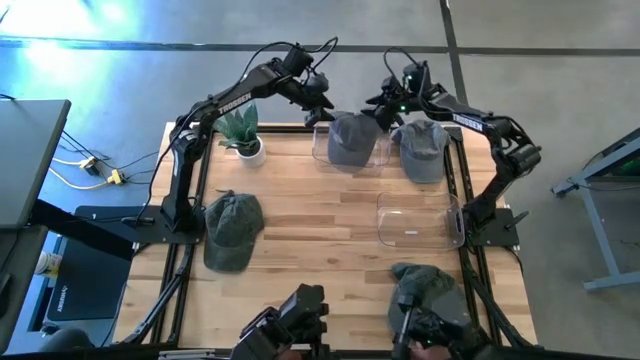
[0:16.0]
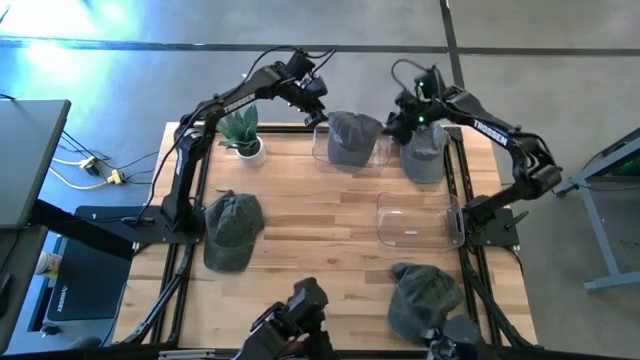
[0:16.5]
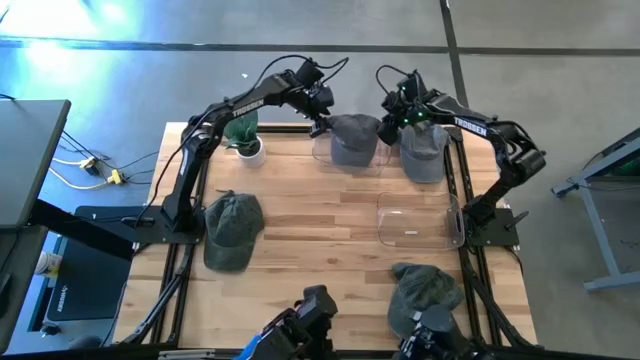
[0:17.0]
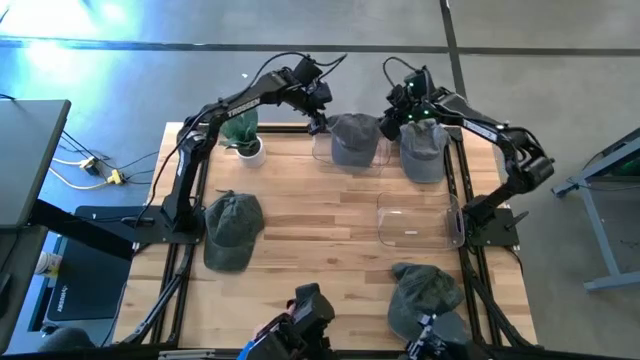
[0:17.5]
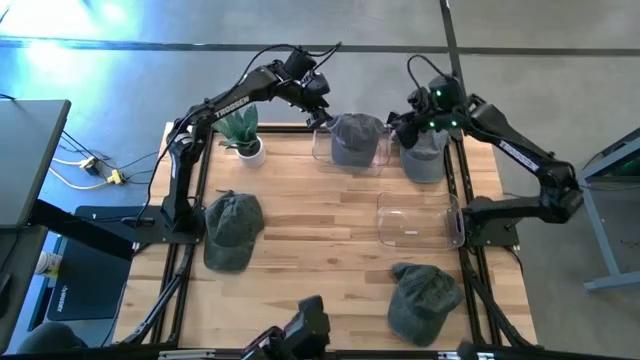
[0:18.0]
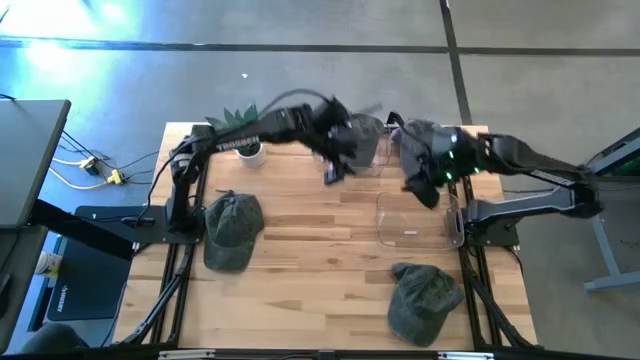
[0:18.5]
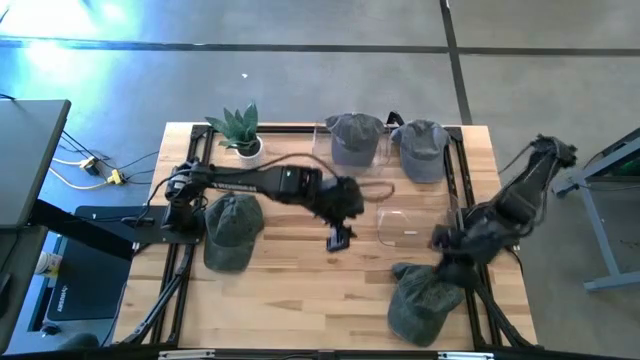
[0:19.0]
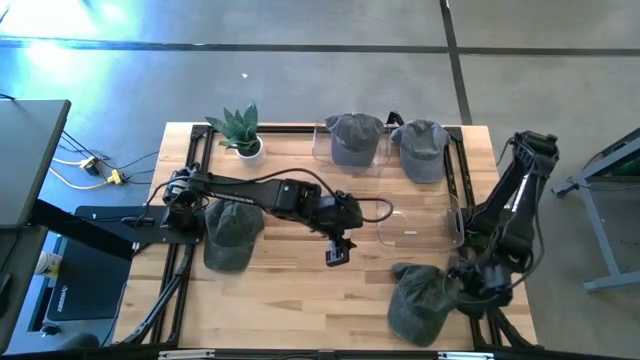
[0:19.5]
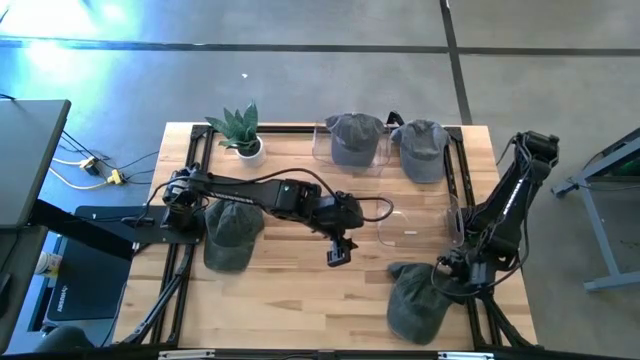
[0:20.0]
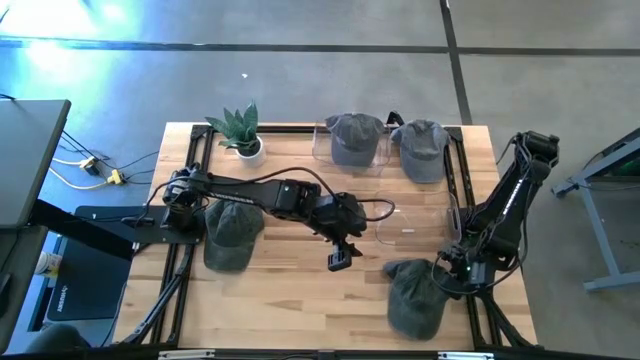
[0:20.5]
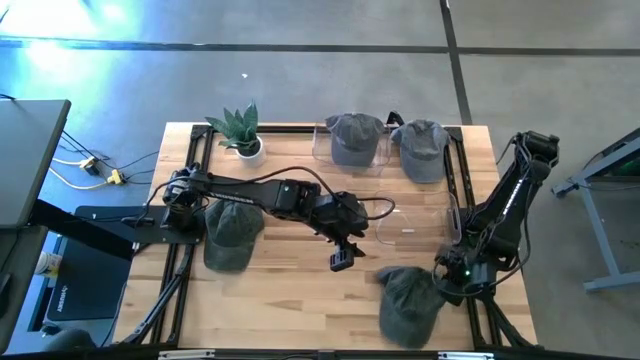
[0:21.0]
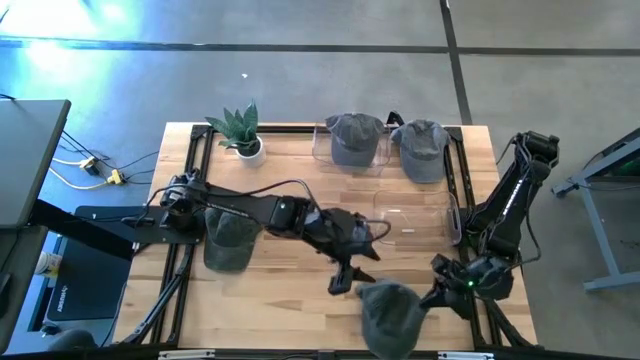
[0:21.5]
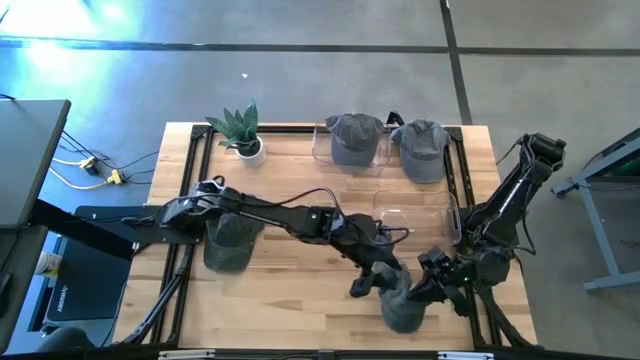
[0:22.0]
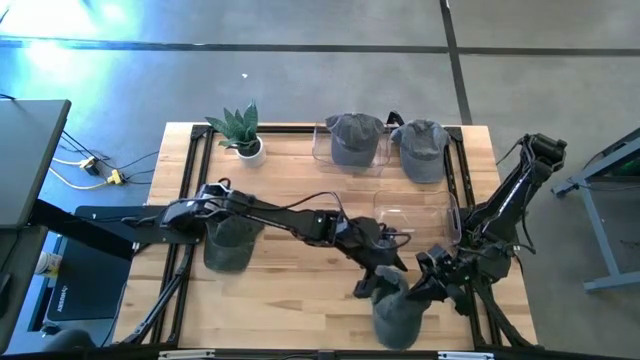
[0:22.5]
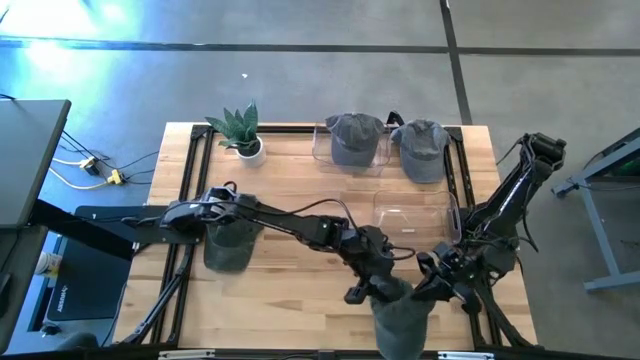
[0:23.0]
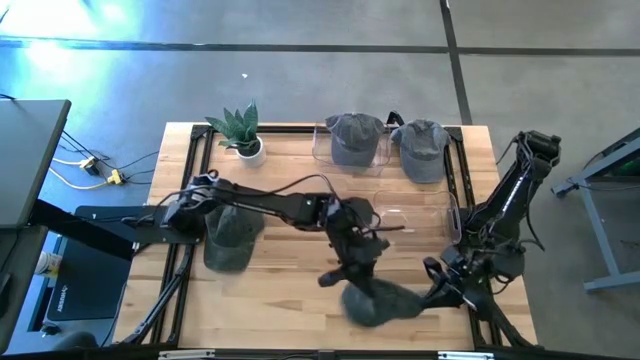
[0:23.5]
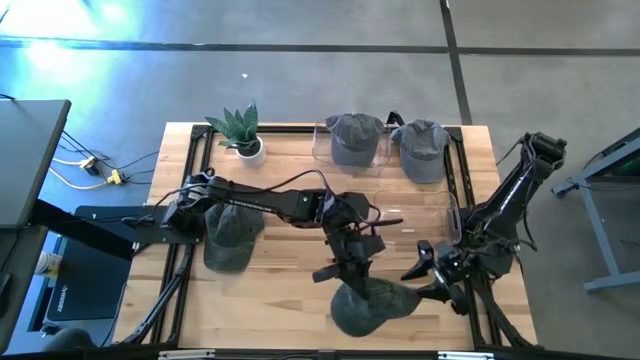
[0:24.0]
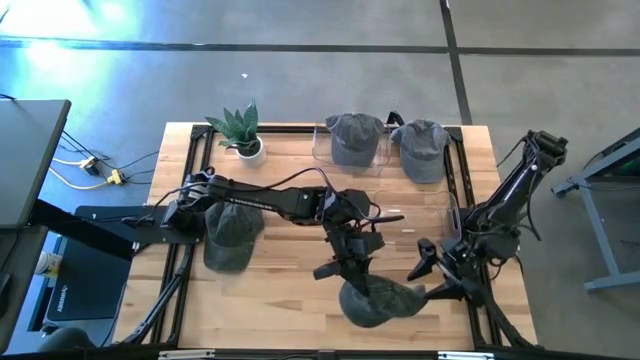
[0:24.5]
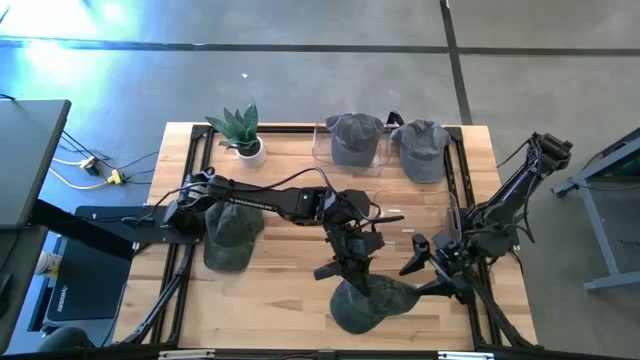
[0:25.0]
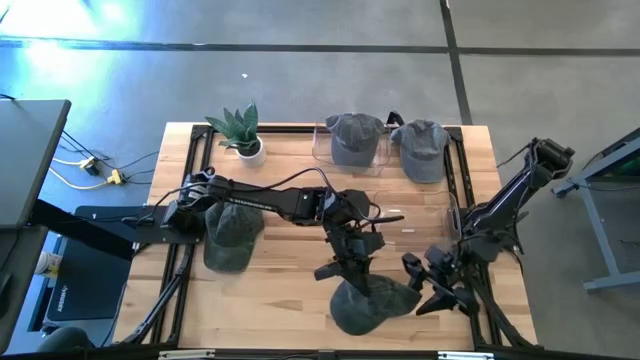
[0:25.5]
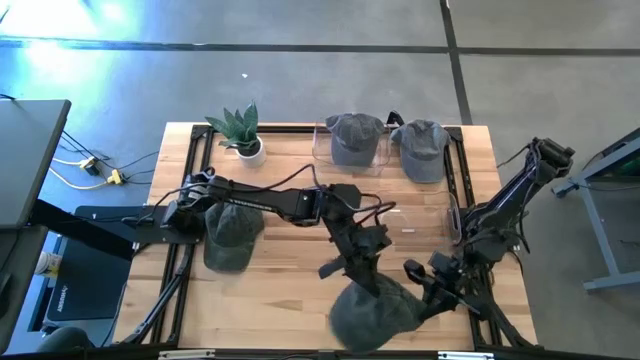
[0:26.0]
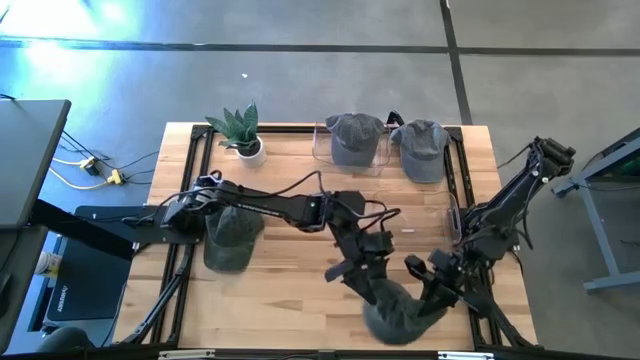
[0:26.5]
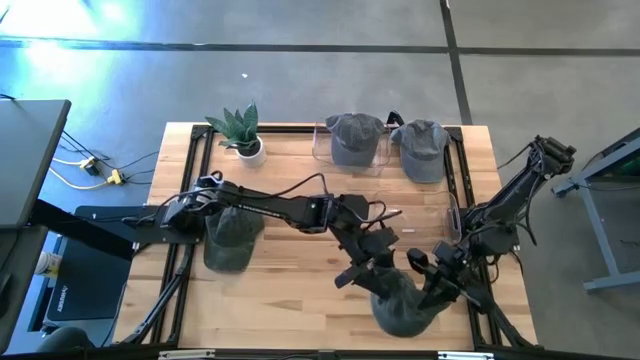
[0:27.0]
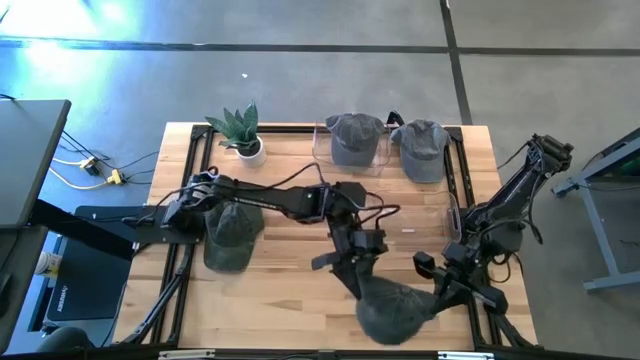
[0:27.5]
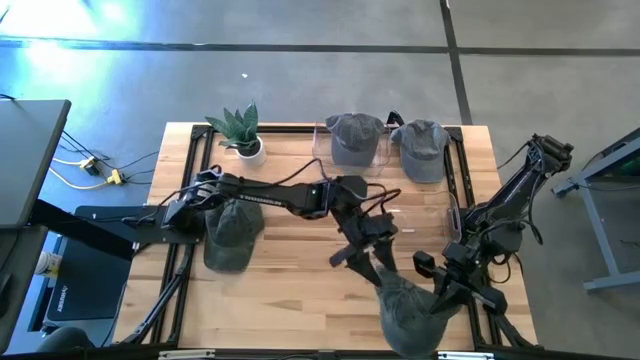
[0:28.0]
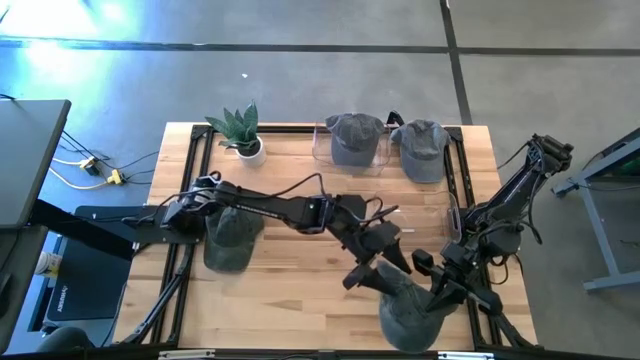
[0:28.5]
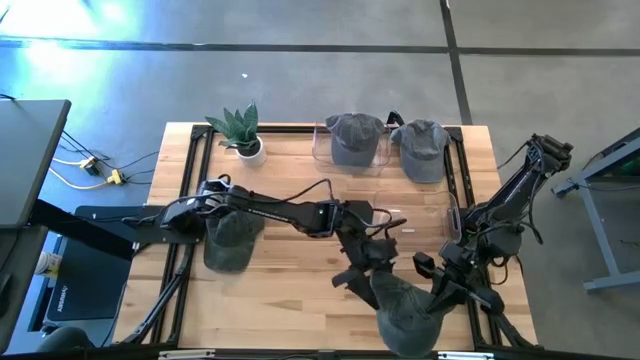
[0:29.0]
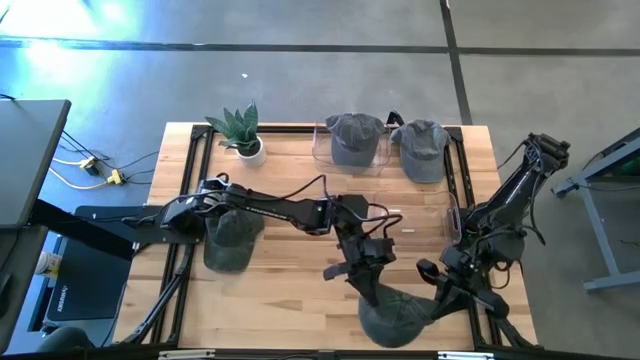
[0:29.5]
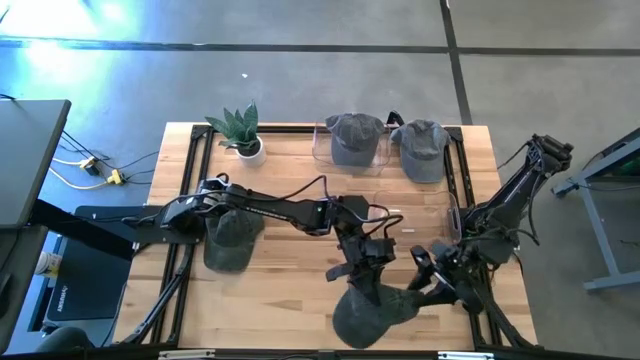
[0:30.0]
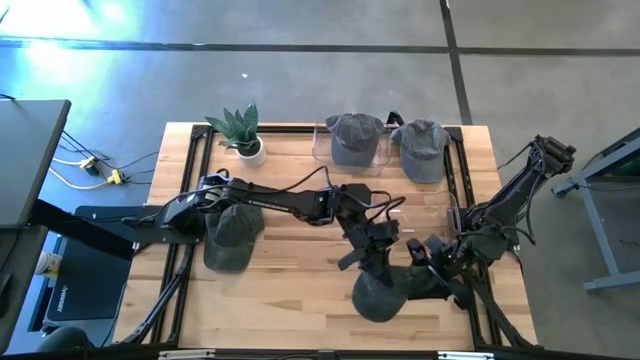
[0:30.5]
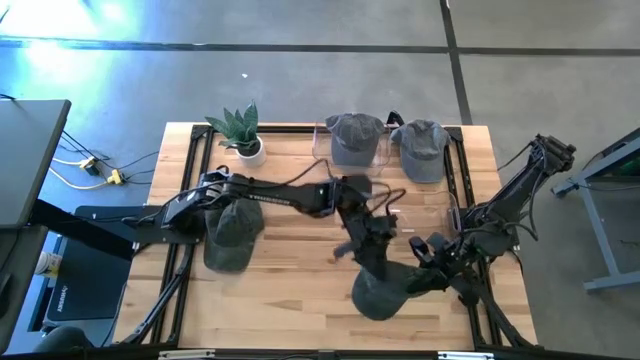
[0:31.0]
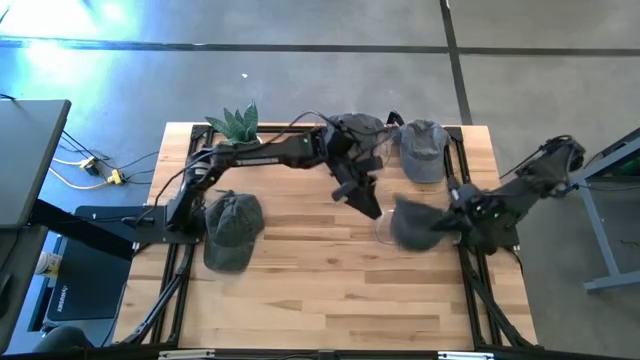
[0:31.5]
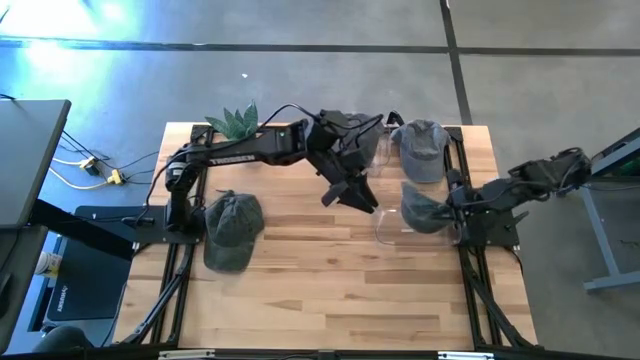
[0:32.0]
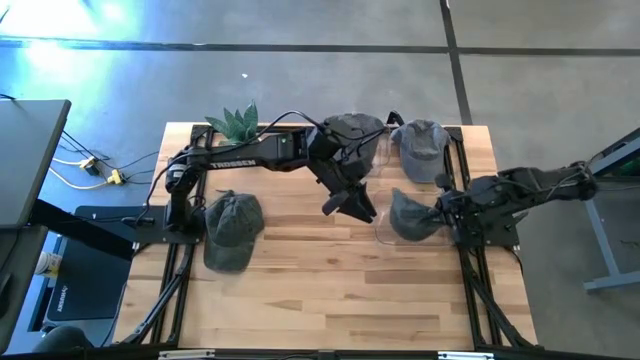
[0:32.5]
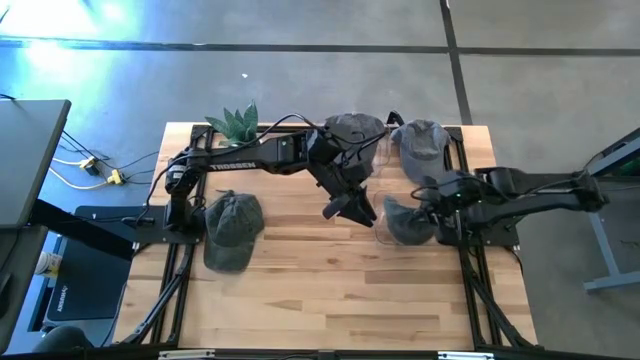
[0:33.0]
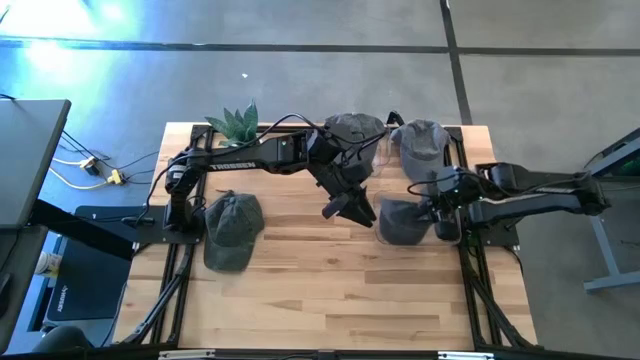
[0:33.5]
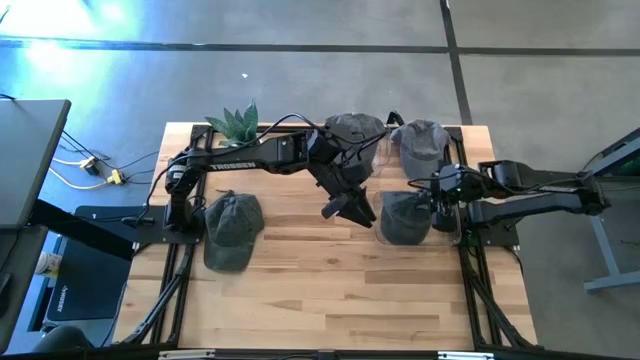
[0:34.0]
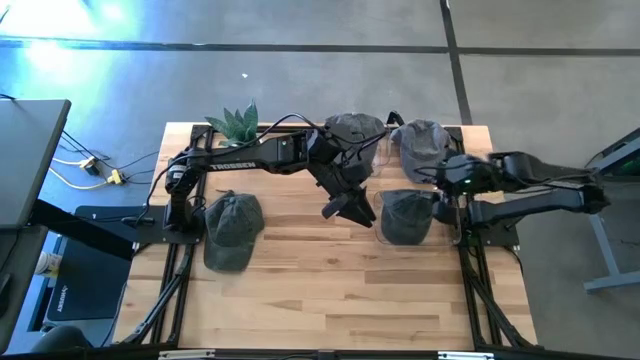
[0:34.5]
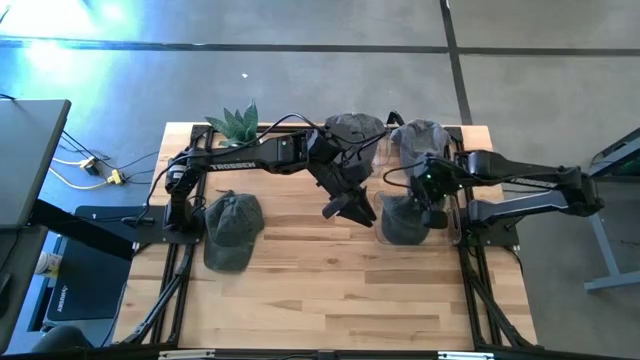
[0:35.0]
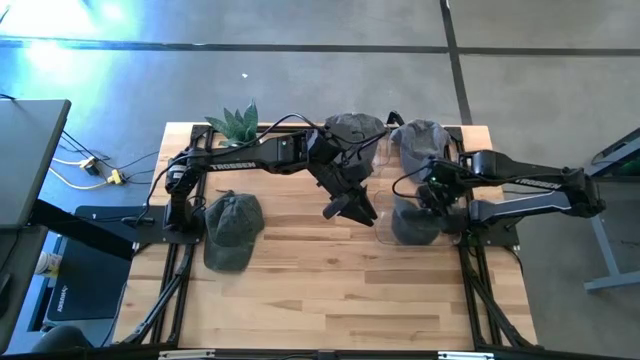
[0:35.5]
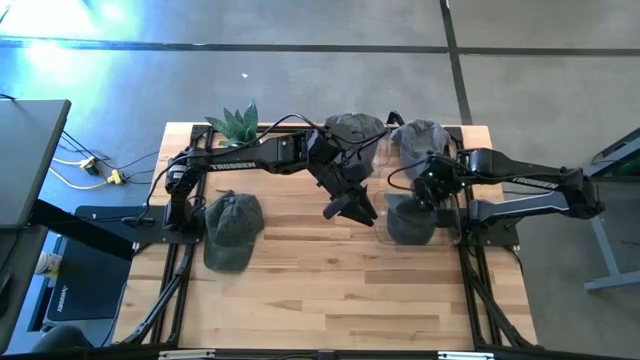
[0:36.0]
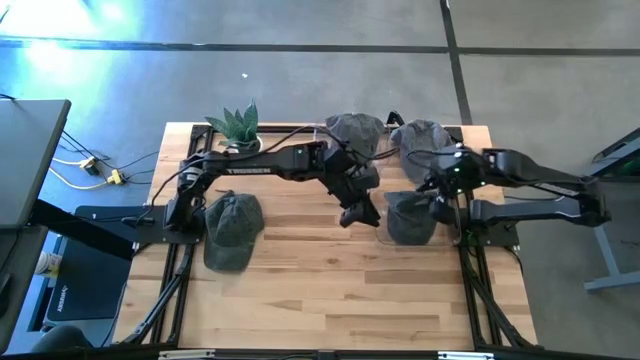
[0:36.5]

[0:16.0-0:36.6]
Task: Pick & Place hat
Put the bottom black cap into the bottom transparent bin

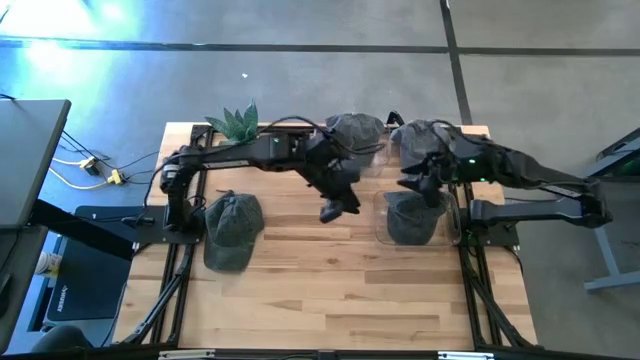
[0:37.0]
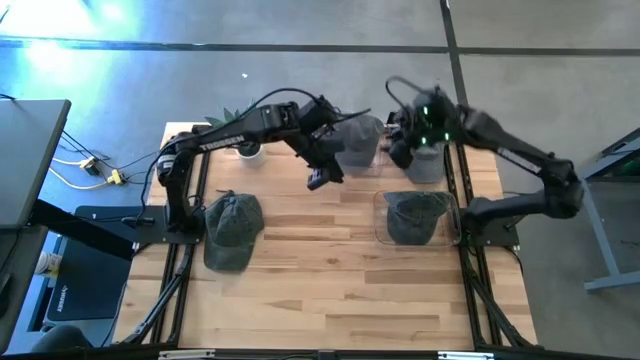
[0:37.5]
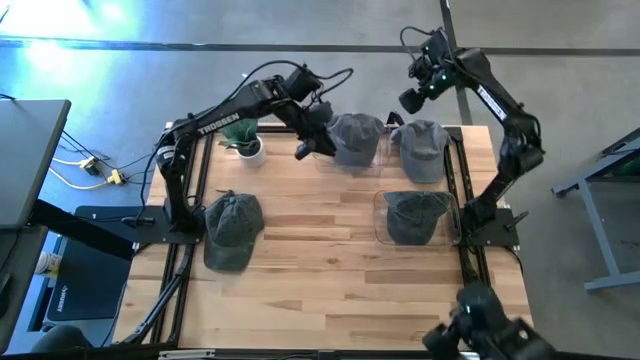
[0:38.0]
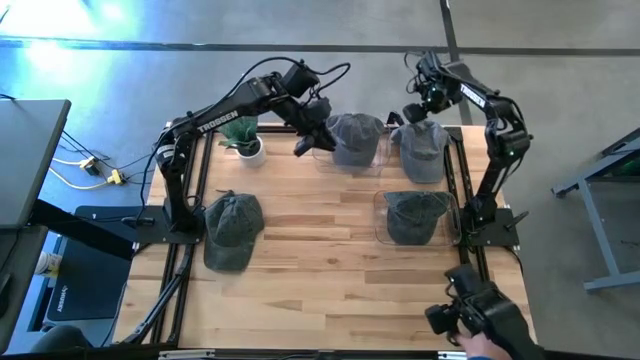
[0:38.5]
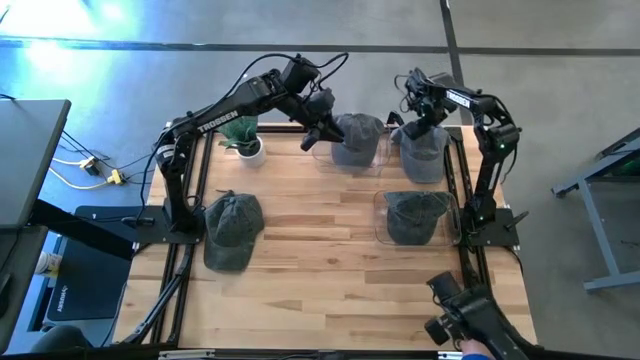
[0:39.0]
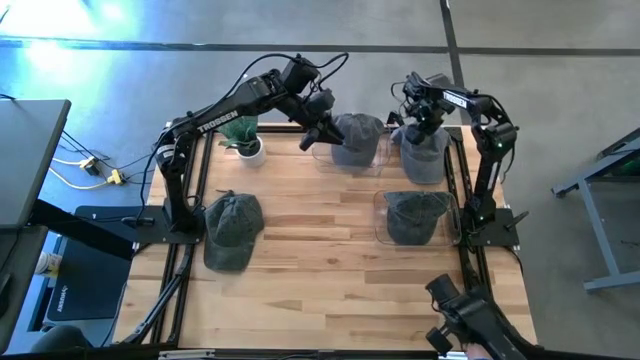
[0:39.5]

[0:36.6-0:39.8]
Put the gray cap into the top transparent bin
